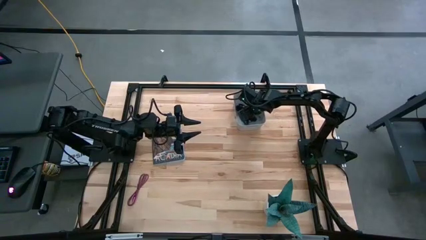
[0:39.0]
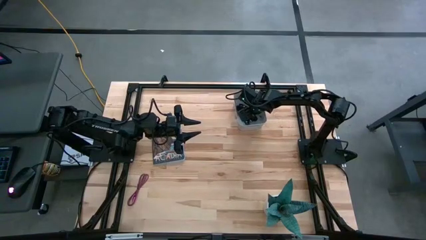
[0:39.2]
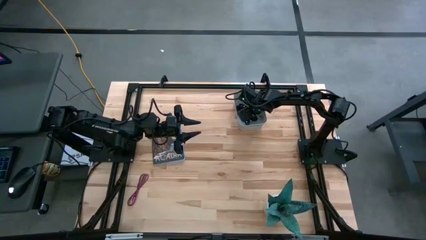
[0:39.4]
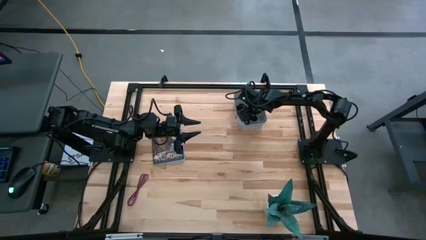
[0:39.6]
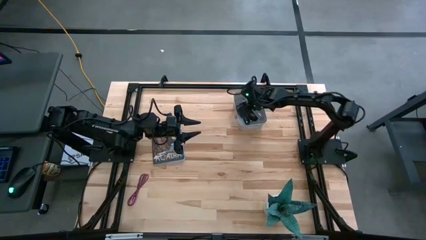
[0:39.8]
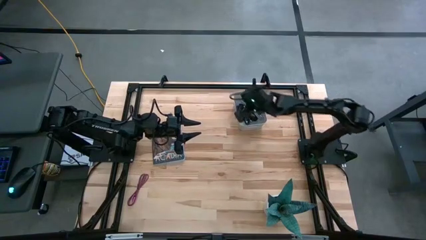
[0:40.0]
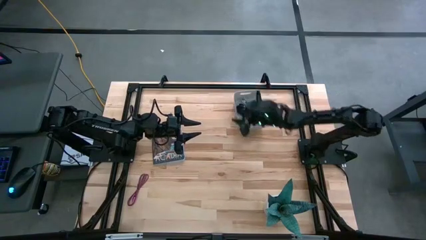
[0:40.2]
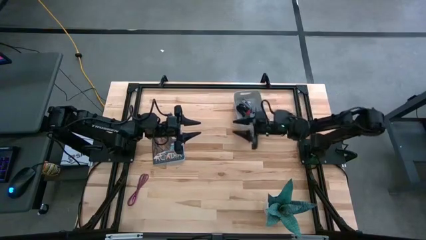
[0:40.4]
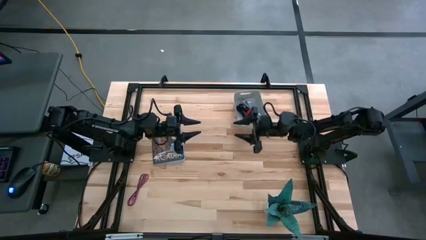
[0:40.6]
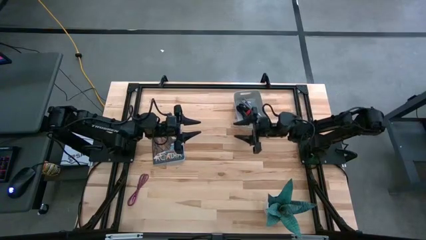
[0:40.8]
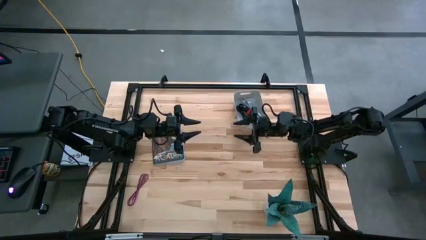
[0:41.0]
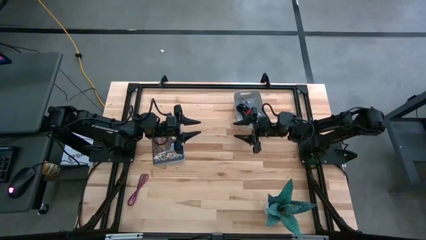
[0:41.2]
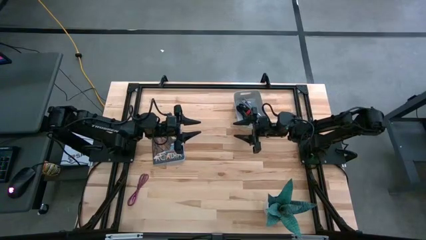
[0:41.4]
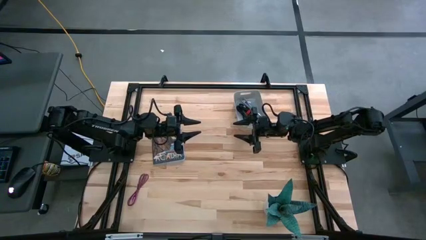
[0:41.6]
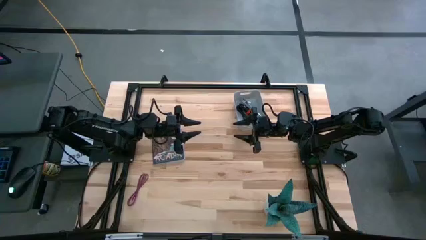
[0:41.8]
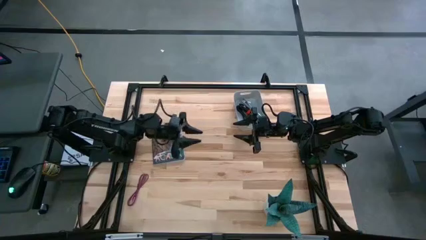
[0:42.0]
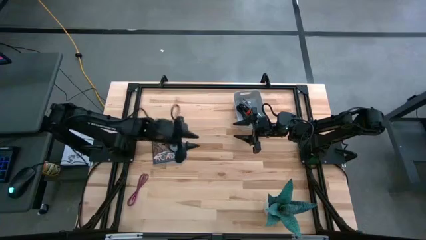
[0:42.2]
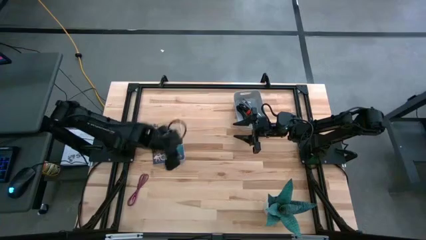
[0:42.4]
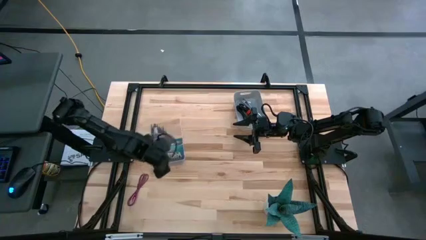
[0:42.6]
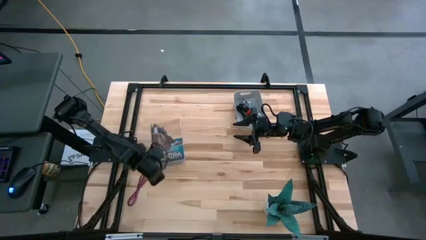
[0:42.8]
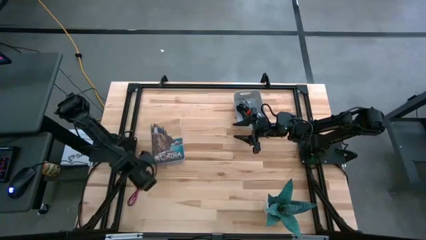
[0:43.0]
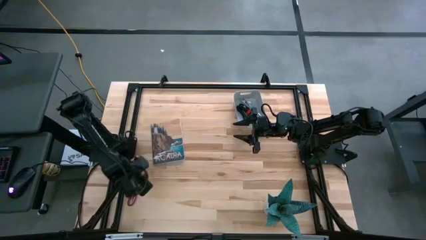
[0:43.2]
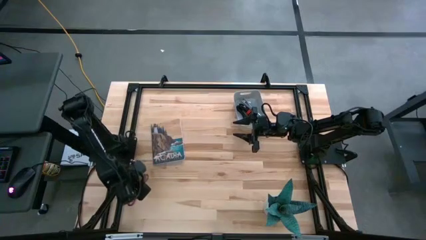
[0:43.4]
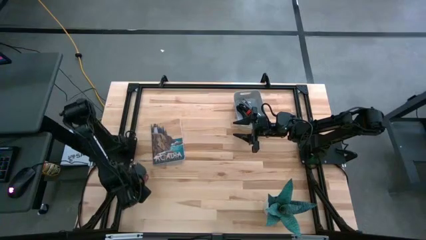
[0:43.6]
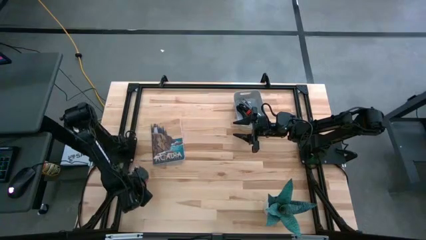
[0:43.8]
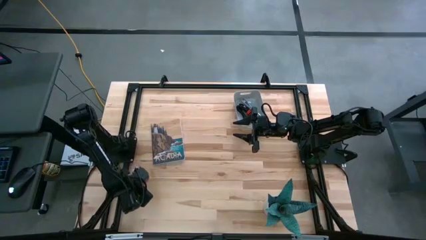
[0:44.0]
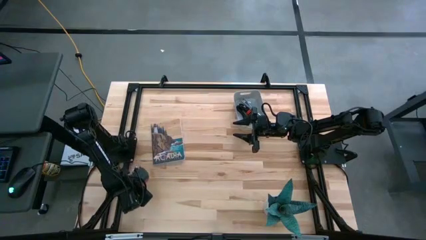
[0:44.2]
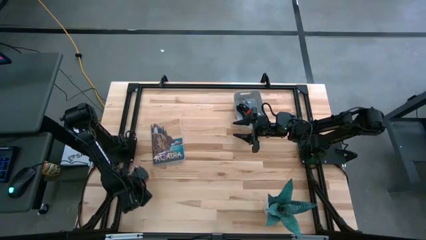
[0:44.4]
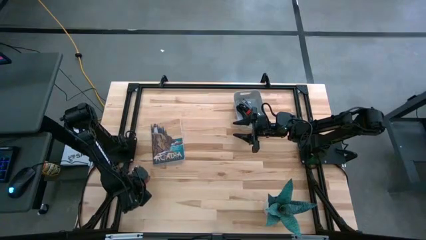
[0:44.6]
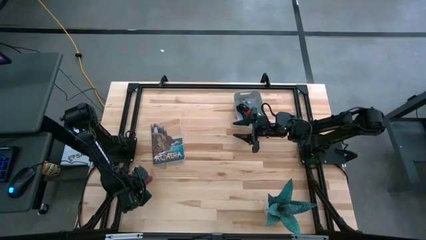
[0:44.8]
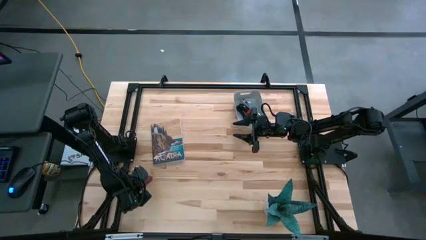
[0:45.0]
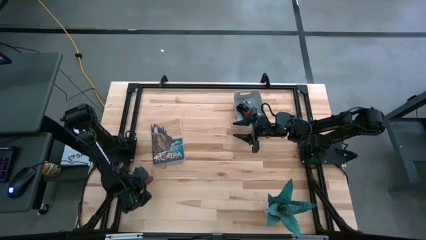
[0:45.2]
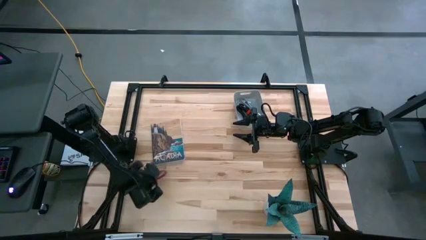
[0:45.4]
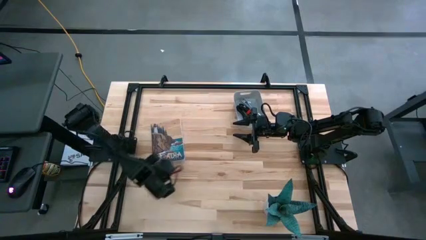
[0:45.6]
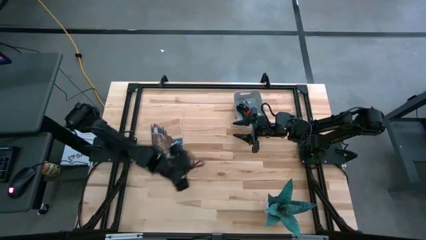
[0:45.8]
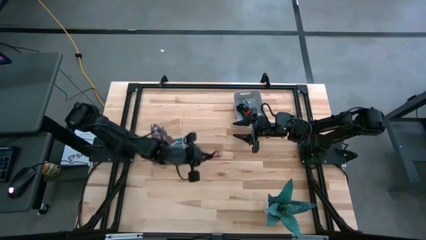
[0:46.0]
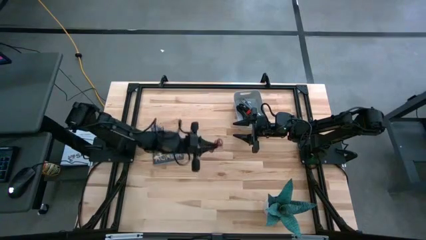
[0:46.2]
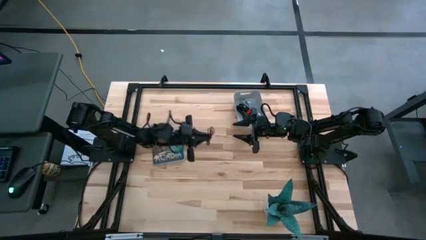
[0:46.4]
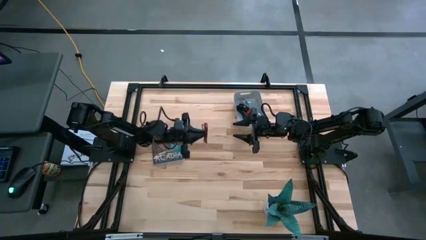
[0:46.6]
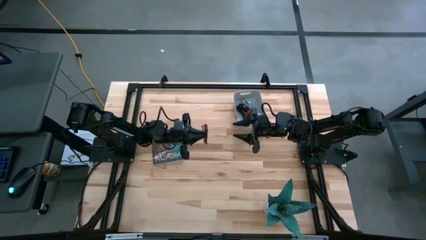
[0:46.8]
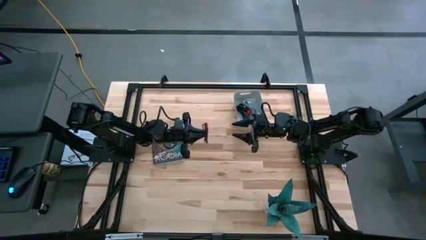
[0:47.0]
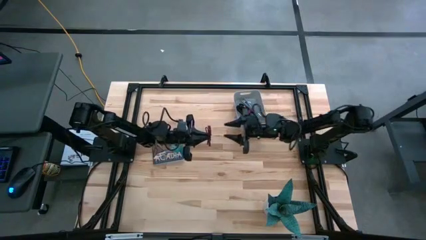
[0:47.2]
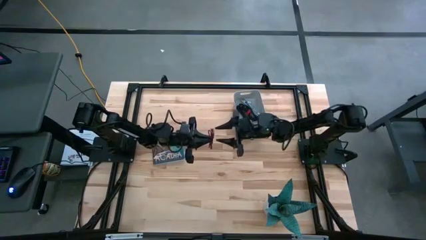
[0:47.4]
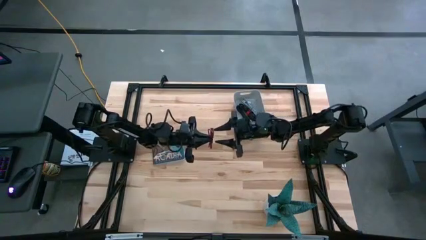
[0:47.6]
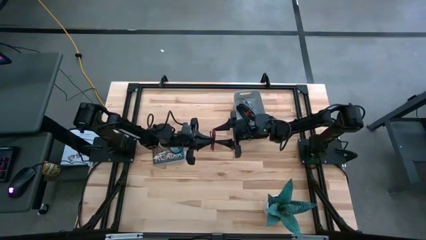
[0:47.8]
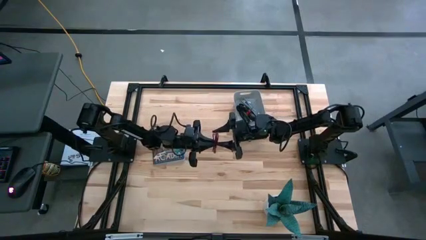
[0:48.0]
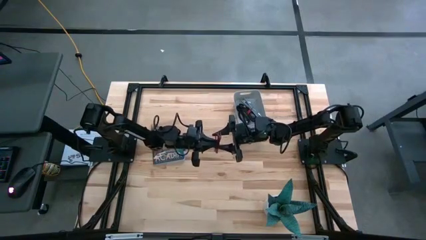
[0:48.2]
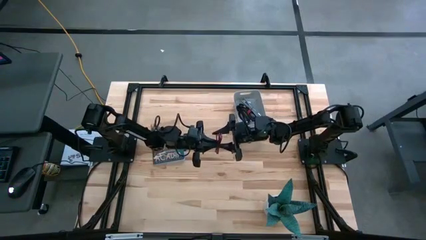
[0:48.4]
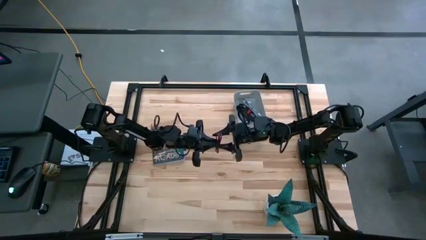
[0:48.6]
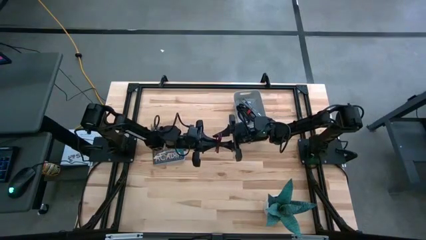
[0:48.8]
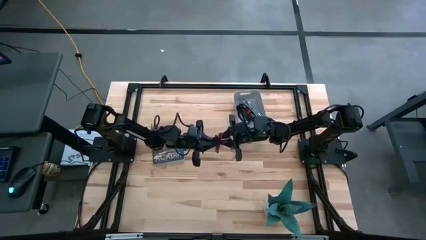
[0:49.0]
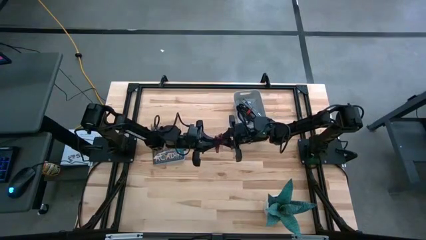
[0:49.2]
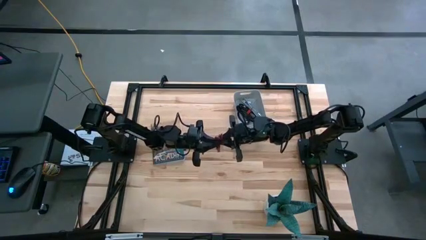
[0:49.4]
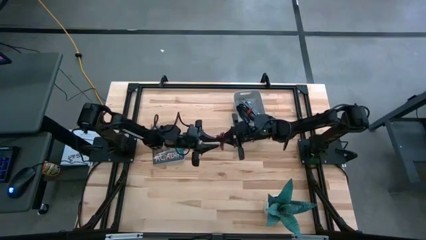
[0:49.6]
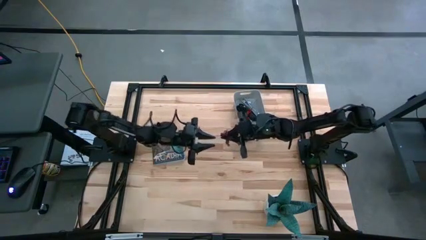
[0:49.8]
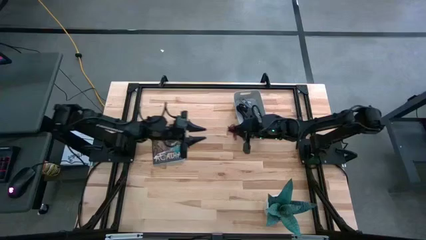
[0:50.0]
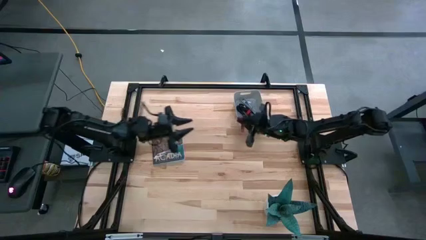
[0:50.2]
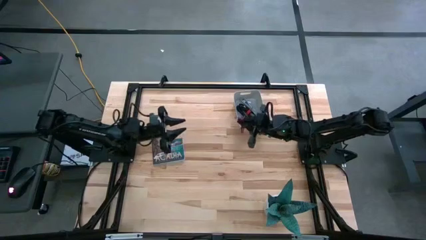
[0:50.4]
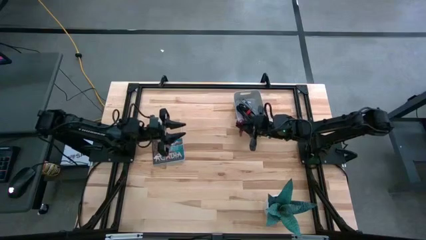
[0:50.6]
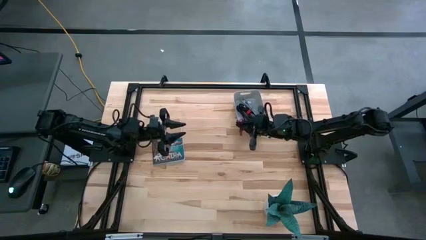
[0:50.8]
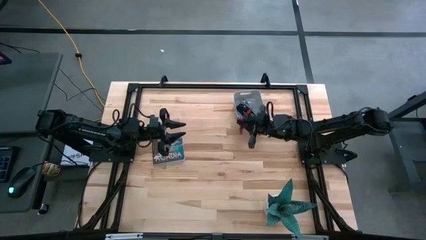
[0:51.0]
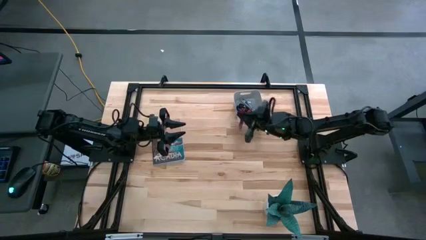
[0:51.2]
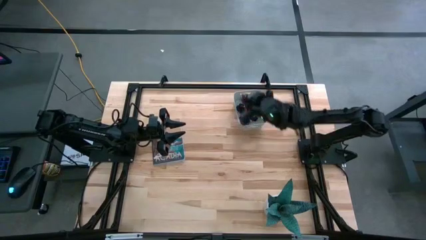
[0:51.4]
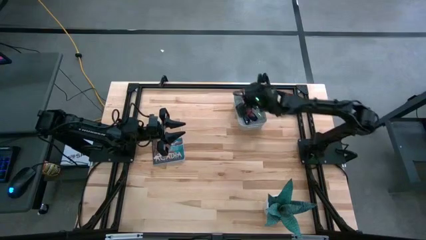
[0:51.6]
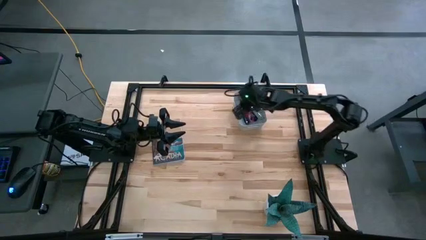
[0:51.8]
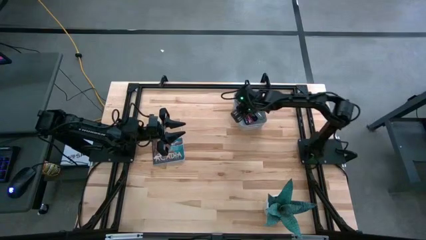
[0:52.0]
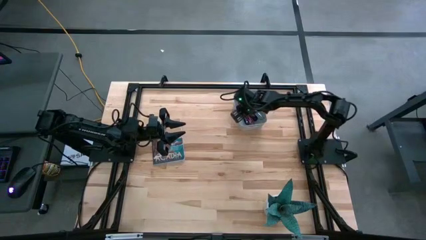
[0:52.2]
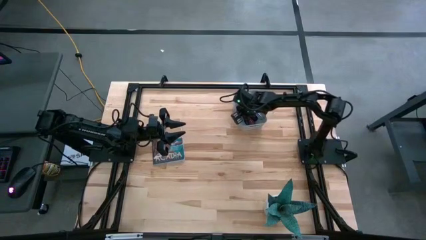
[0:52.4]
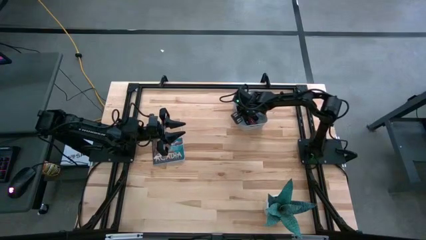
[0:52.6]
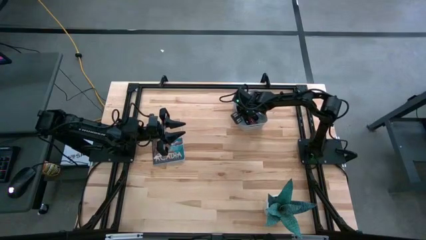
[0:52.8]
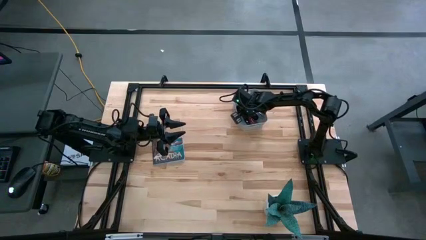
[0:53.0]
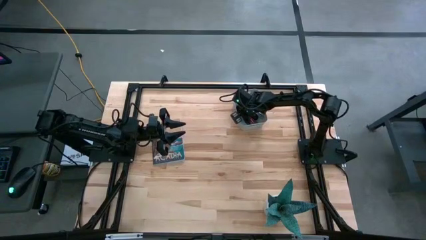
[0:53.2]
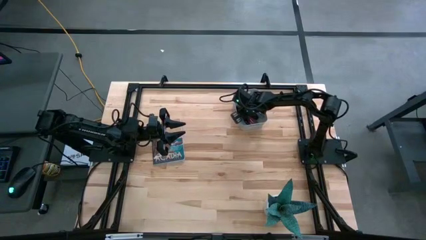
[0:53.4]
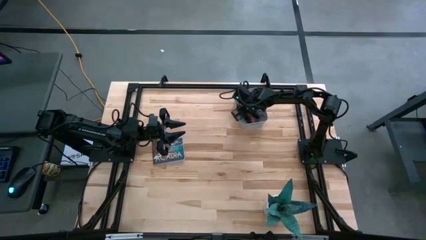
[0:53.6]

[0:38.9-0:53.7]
Task: Pick and place USB-C Cables
Put the pink usb cable into the white bin

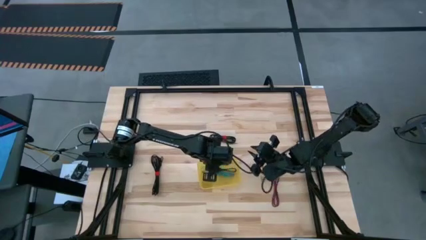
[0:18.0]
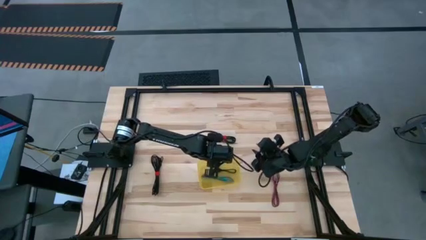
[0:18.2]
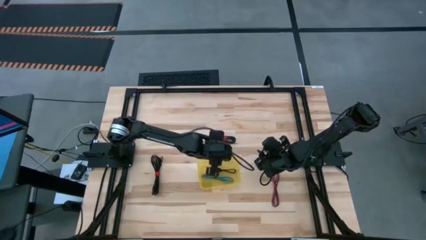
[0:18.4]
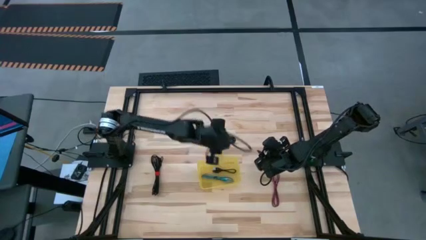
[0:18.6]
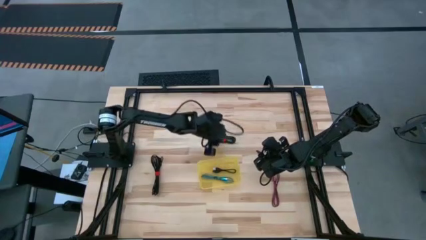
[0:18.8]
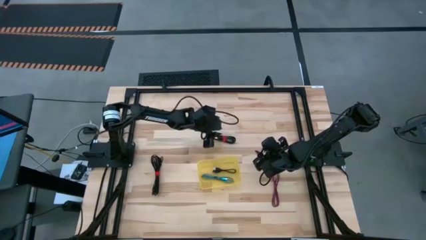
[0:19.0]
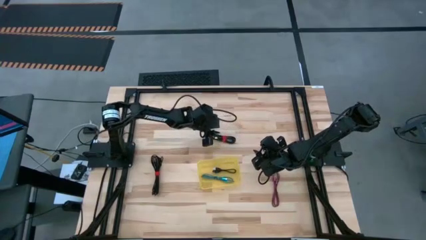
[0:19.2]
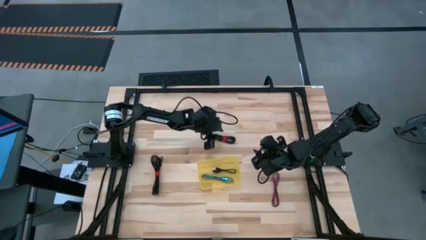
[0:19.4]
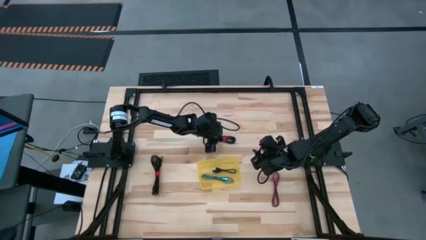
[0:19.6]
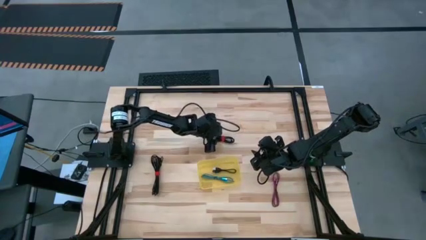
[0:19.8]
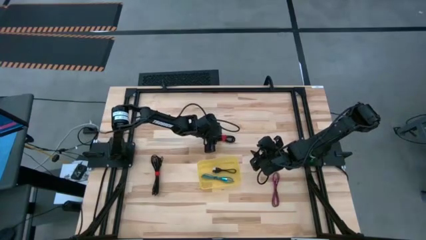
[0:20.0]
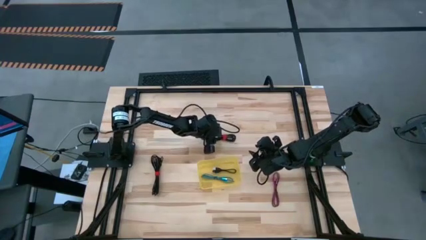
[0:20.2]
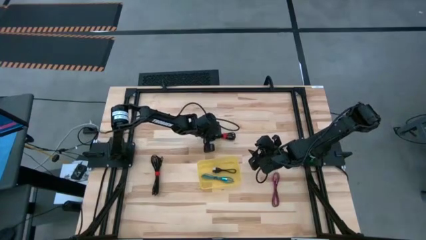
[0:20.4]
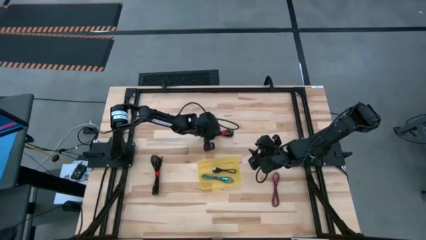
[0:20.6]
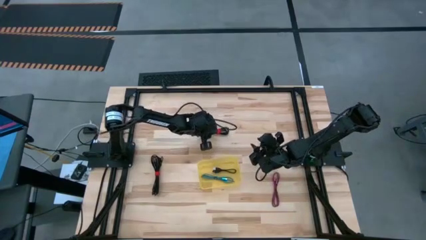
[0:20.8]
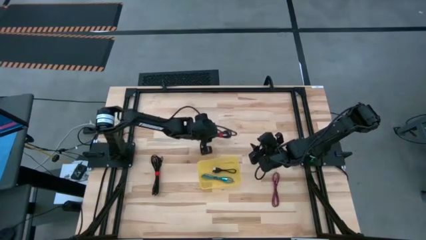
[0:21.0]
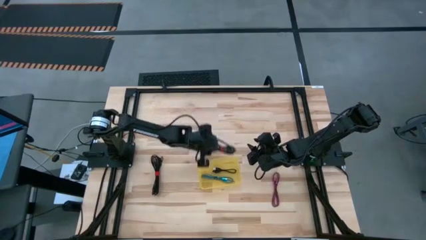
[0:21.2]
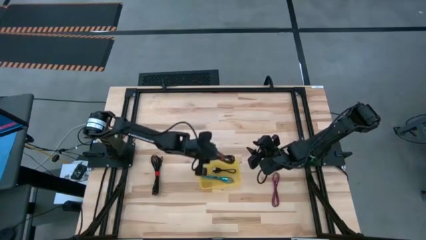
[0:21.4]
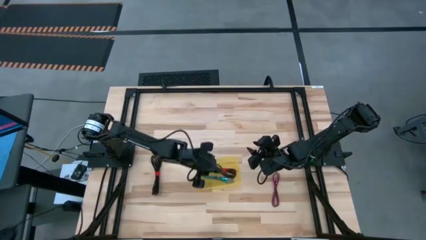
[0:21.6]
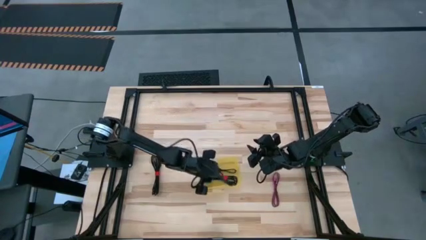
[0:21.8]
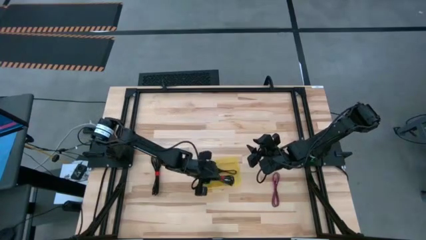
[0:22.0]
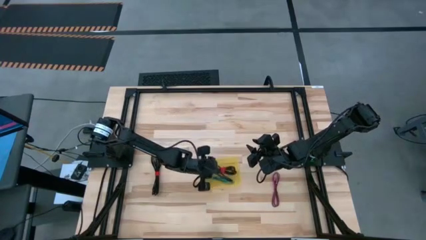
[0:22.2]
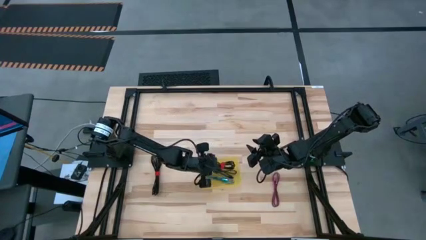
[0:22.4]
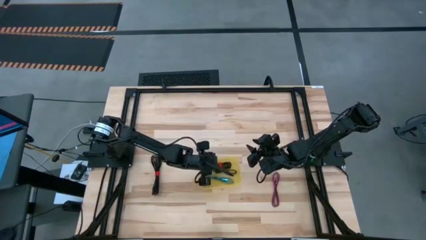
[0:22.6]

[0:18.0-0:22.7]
Task: Pick and place USB-C Cables
Put the top black charger cable into the yellow bin
